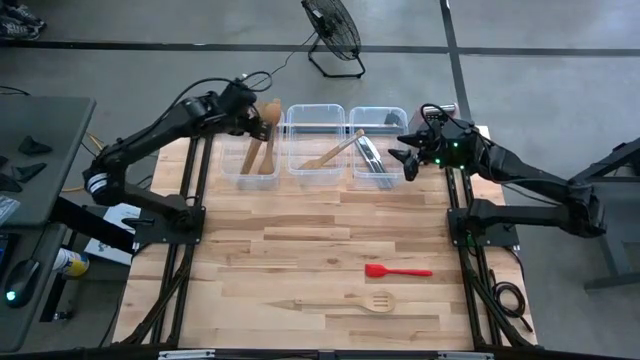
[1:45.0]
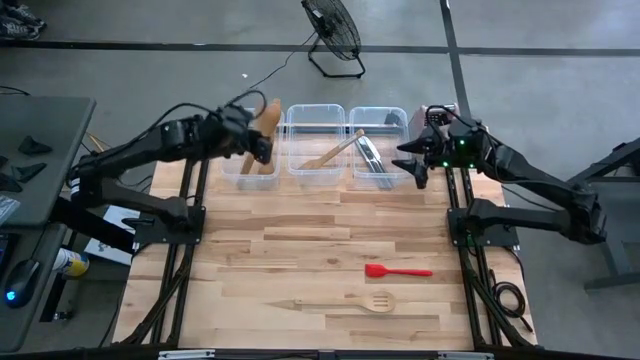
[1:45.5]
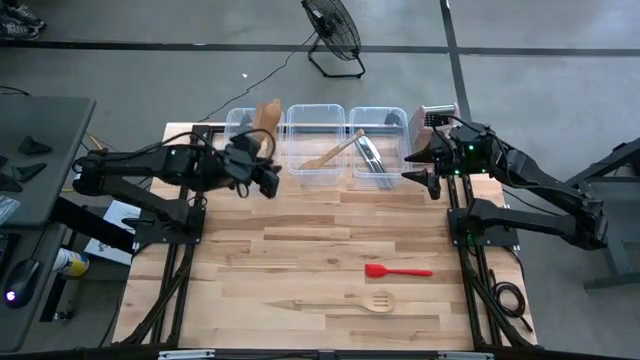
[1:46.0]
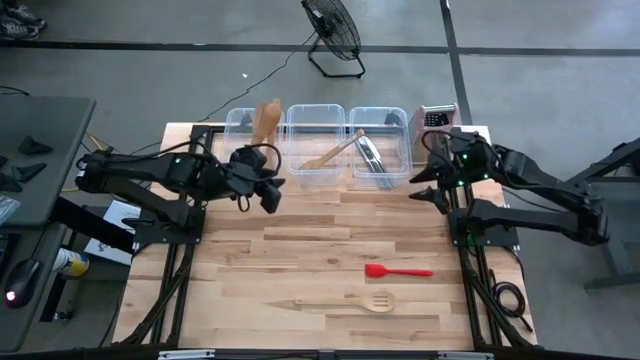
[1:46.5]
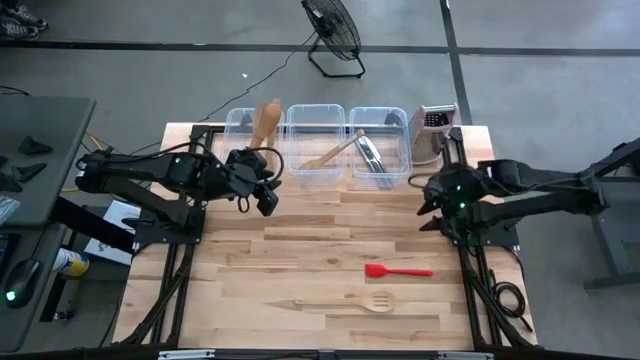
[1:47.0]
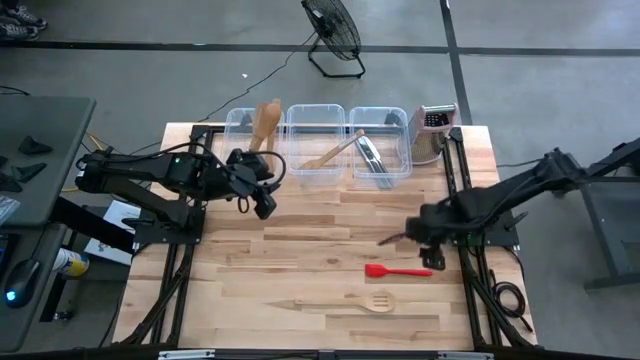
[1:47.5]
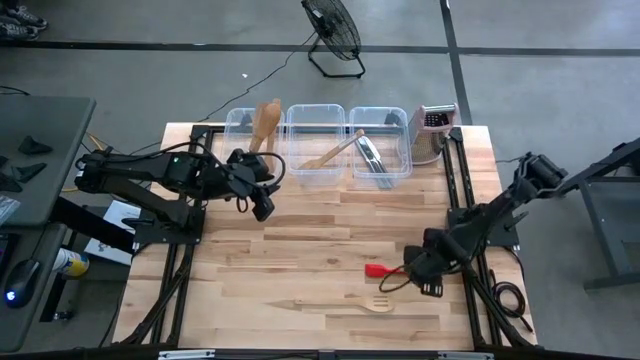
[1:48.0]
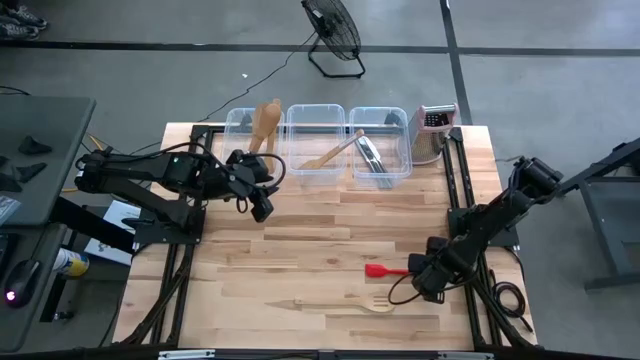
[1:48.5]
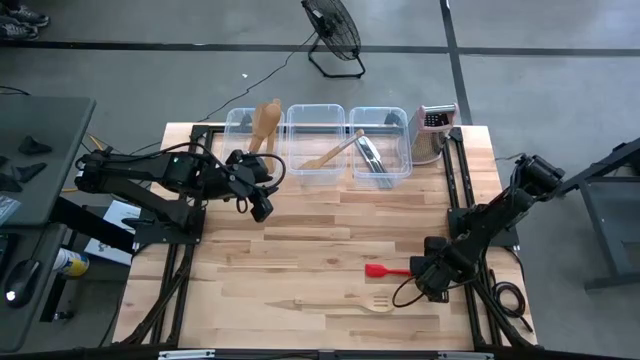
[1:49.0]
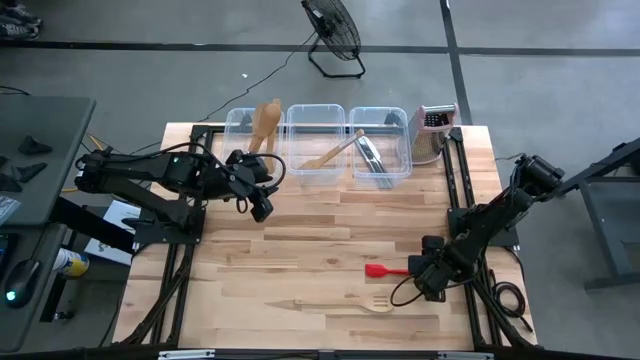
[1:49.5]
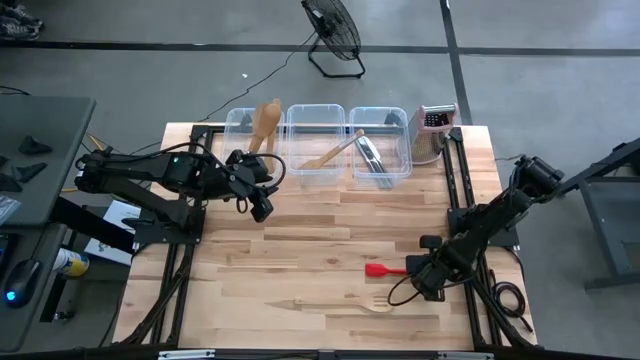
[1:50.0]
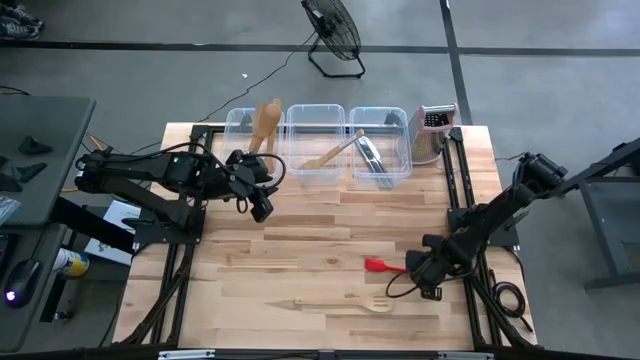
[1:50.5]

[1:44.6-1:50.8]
Task: Pick & Place Kitchen Items
Put the red rubber scraper into the middle transparent bin

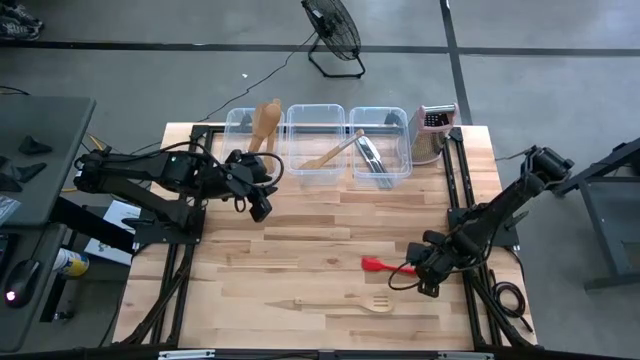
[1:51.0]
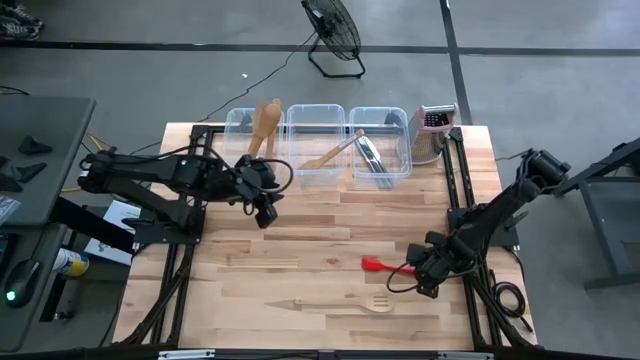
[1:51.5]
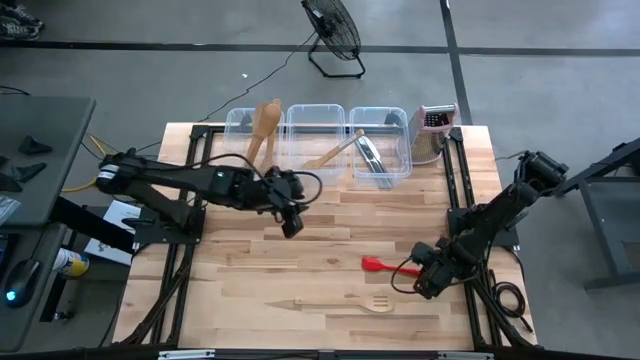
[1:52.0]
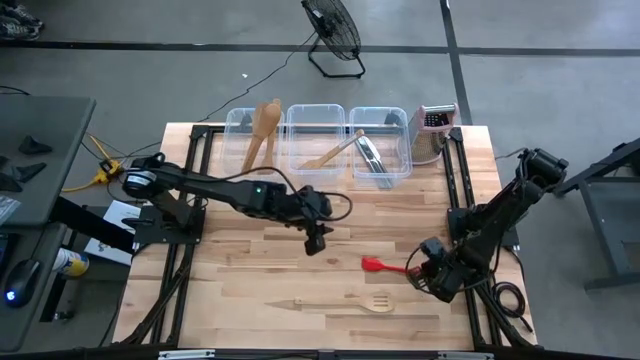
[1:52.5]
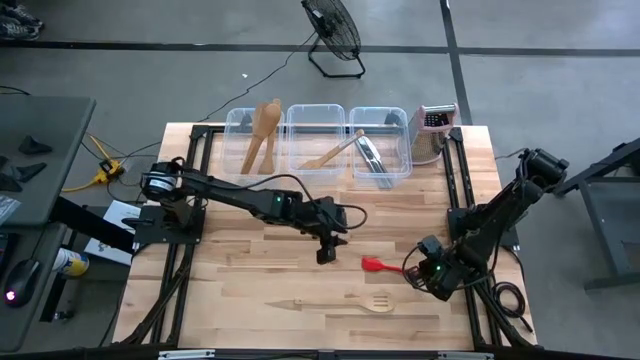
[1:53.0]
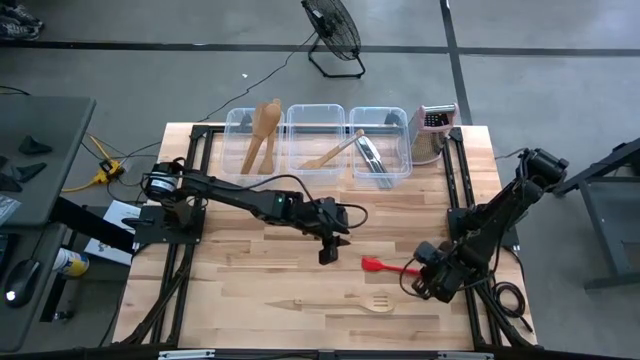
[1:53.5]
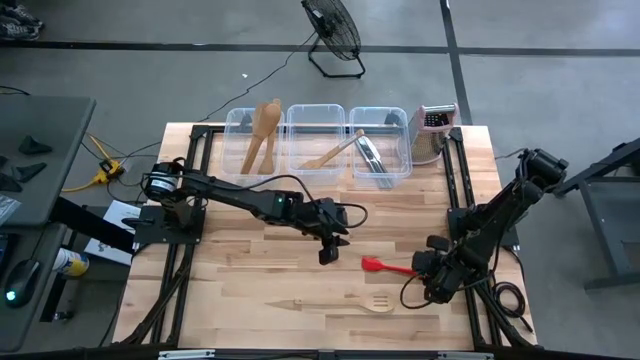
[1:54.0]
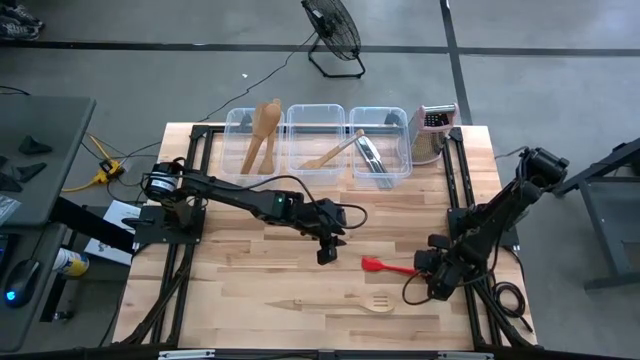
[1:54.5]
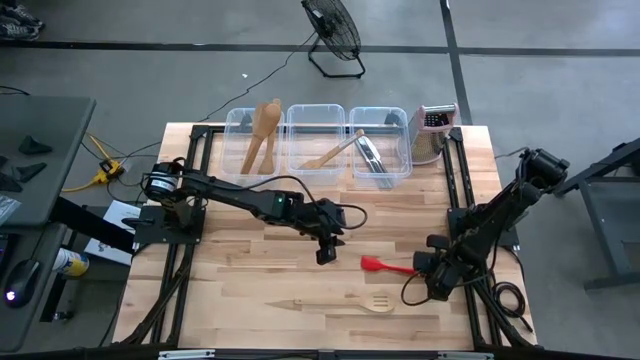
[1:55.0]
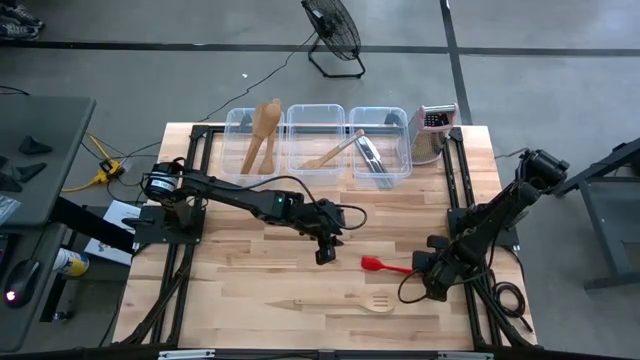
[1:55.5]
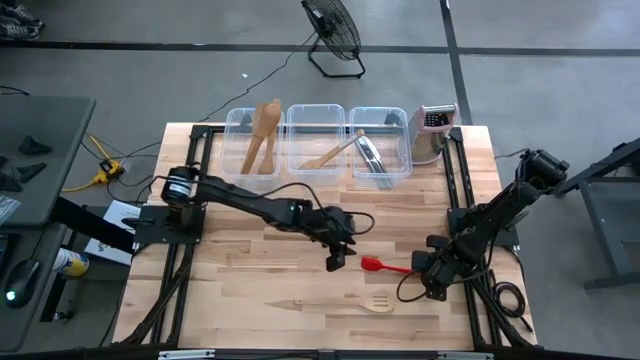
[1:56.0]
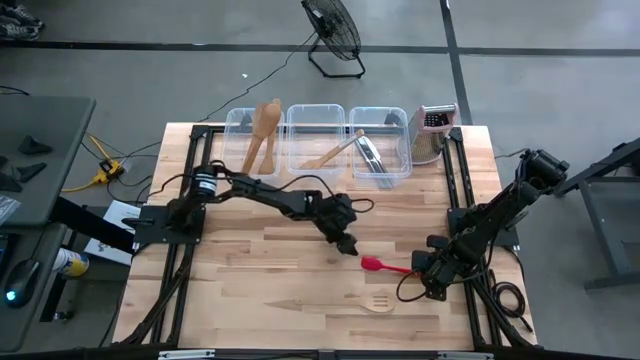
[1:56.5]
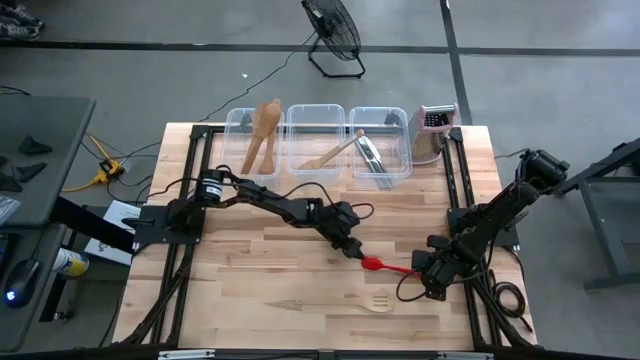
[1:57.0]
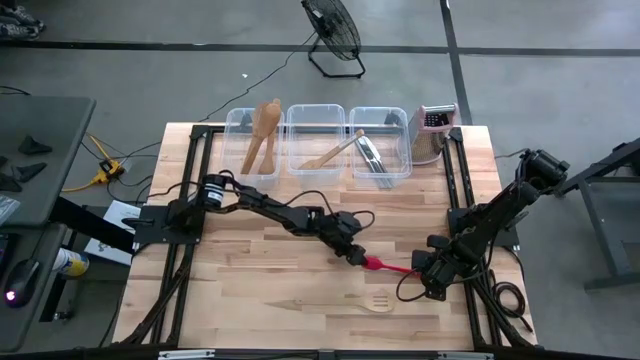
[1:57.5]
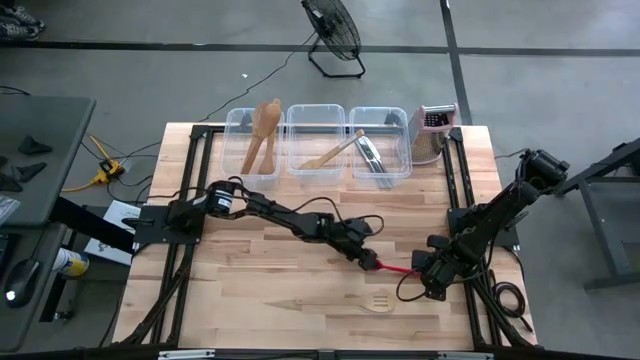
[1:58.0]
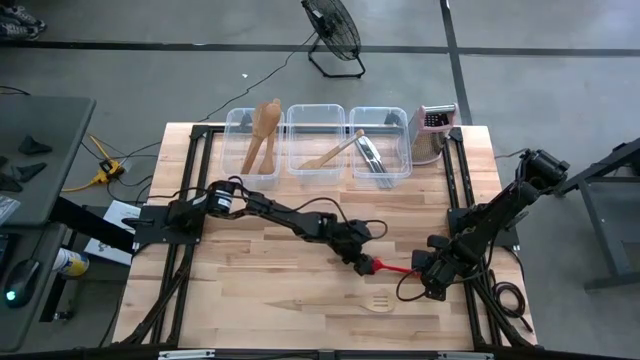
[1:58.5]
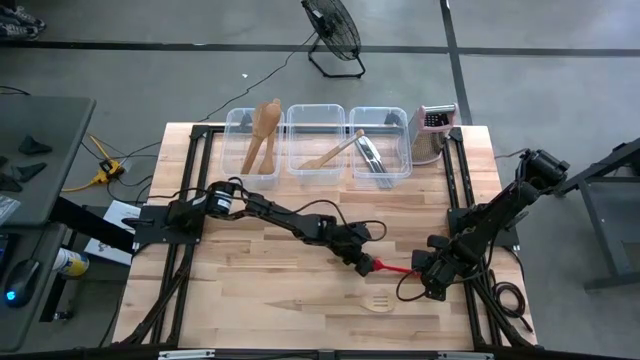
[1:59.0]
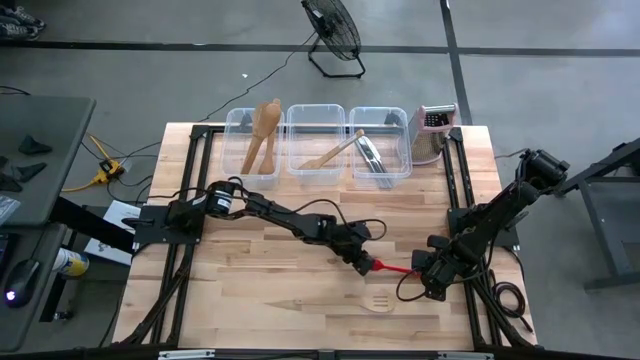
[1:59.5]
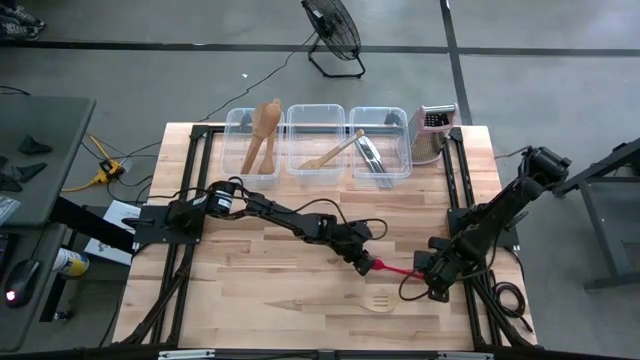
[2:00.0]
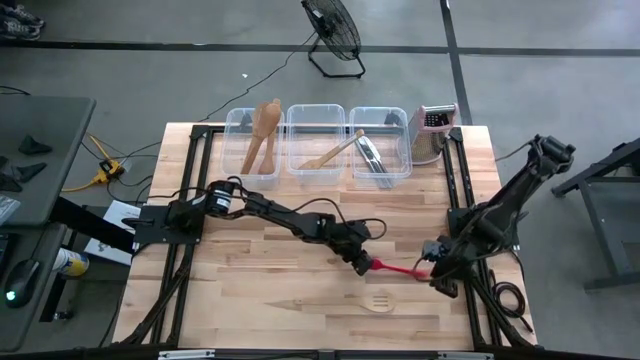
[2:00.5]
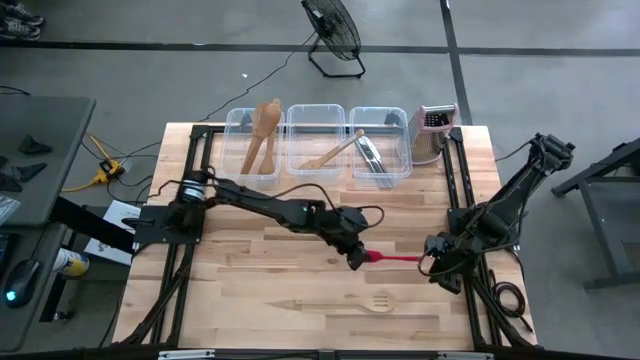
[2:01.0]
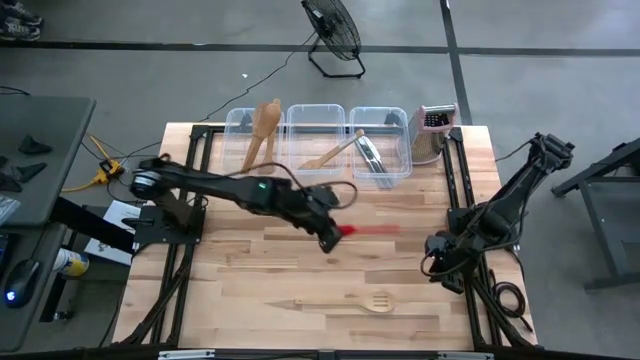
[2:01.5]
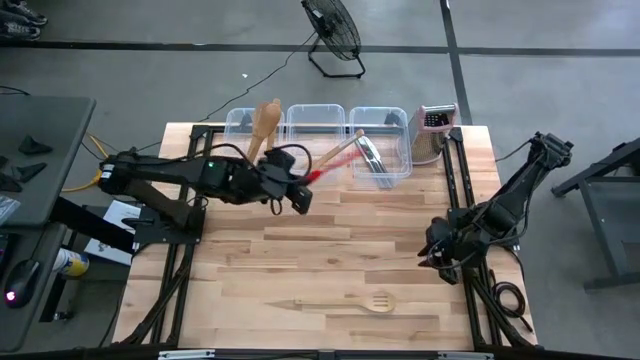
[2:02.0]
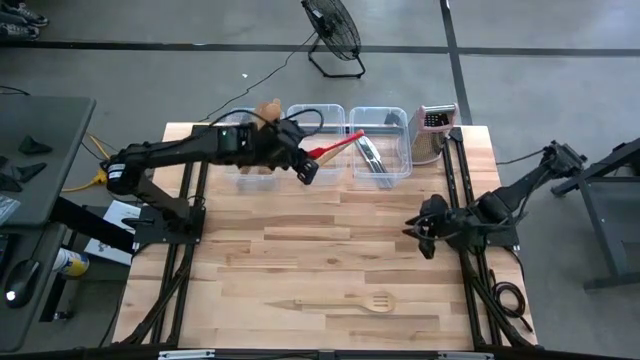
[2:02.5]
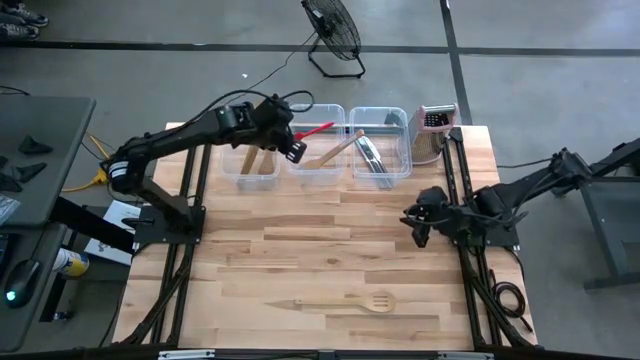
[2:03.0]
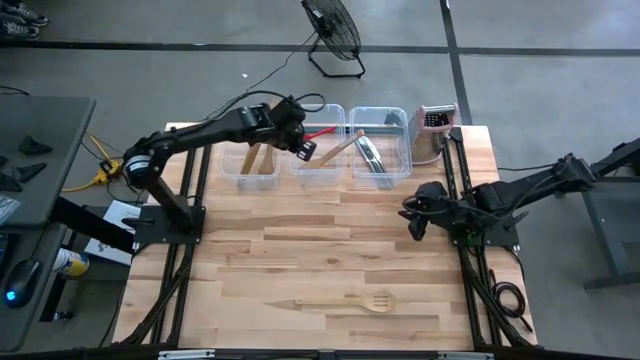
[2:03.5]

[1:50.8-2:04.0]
Put the red rubber scraper into the middle transparent bin

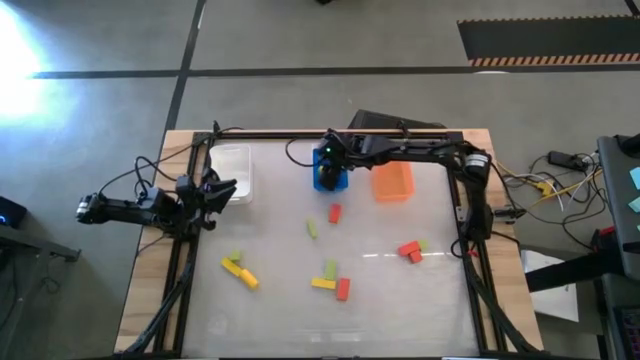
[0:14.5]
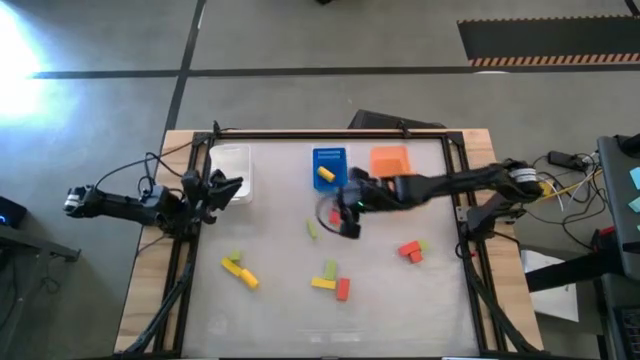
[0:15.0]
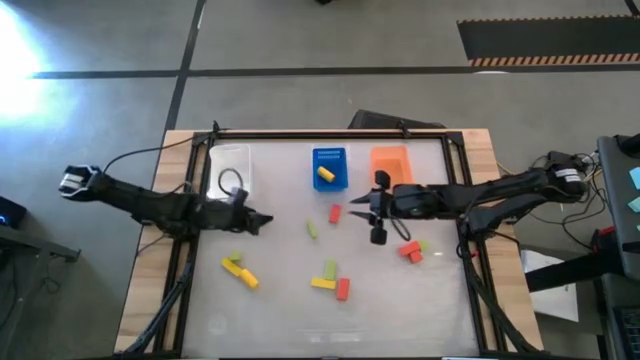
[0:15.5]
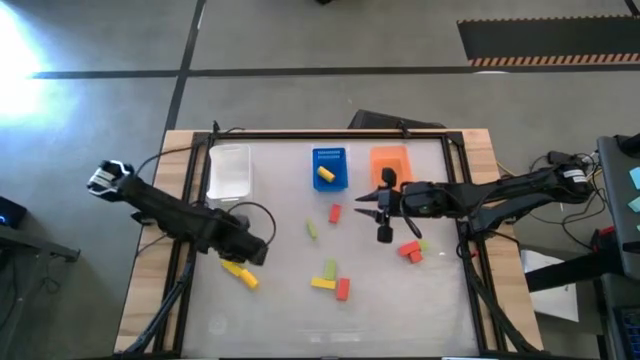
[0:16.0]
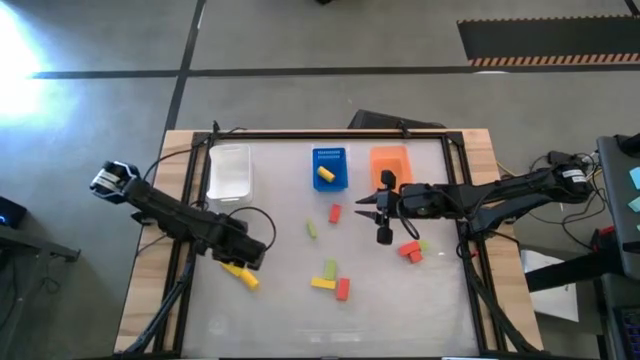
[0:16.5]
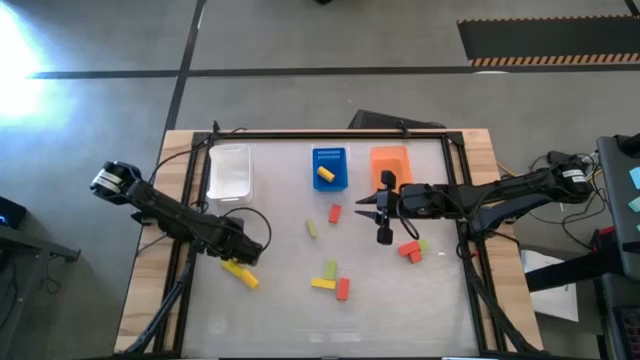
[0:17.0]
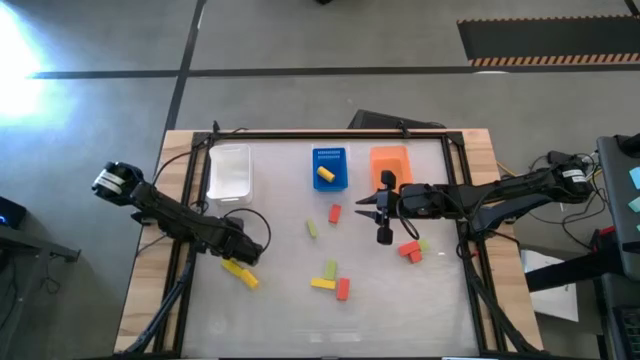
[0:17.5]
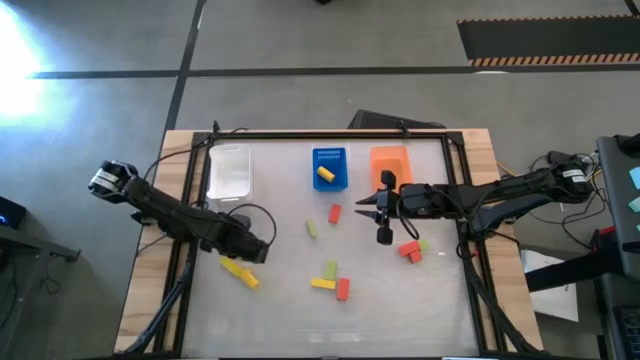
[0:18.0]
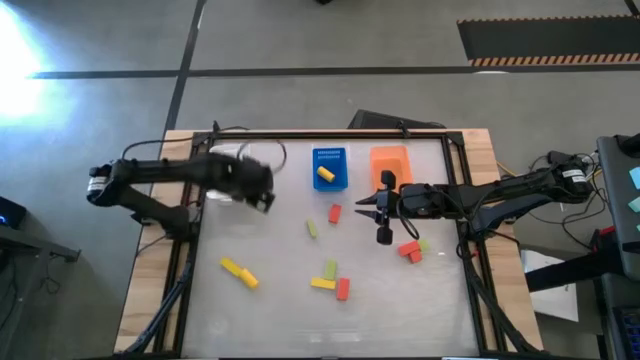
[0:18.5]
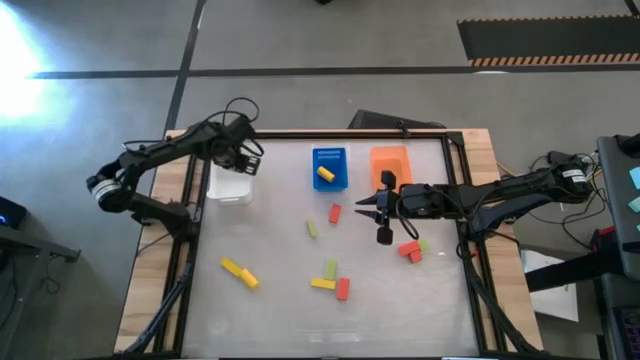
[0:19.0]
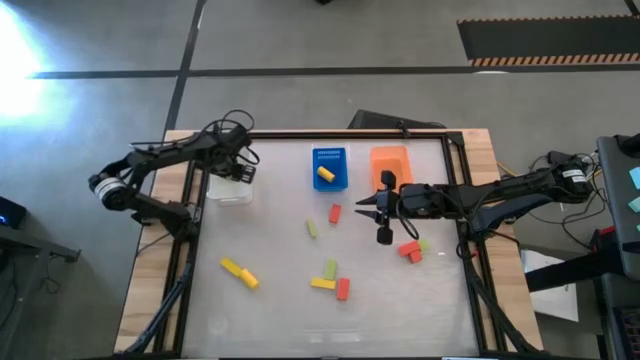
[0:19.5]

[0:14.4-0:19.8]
Task: Sort & place blocks by color
Put the green block into the white bin
